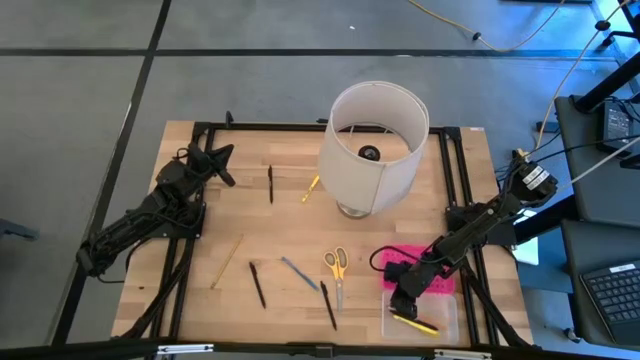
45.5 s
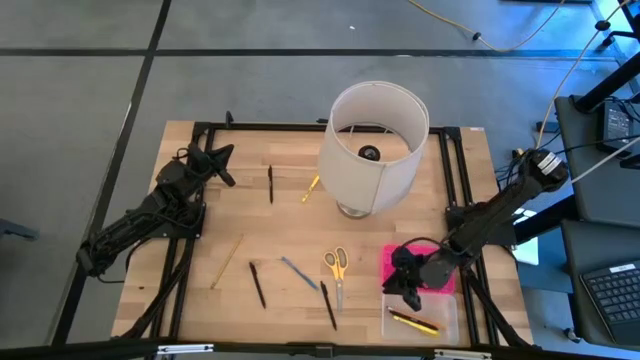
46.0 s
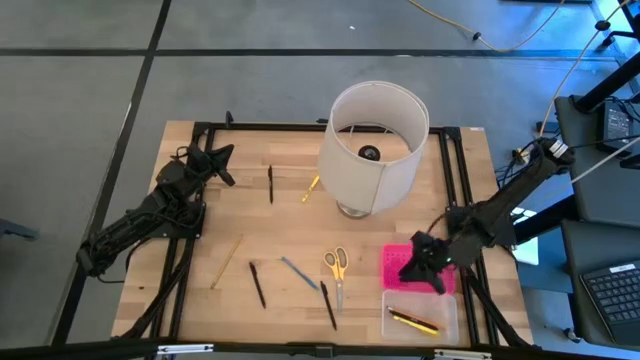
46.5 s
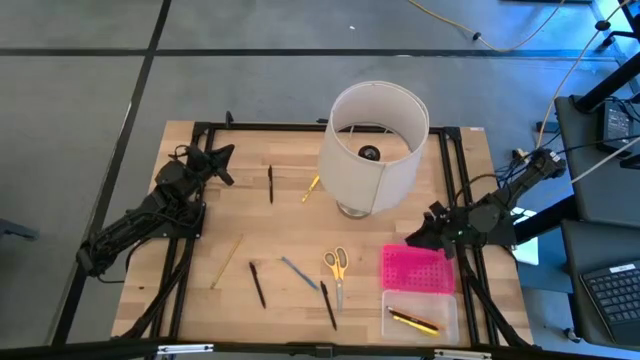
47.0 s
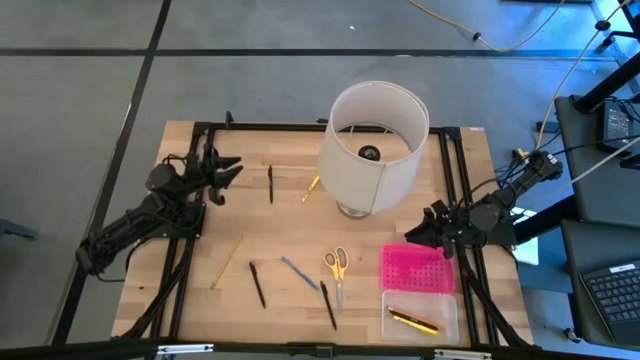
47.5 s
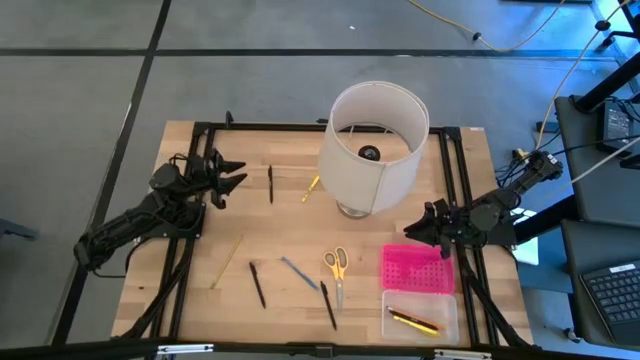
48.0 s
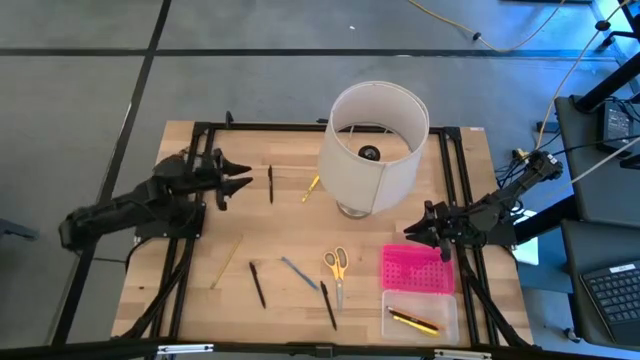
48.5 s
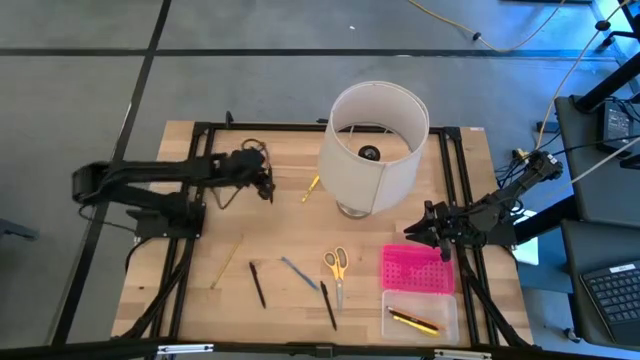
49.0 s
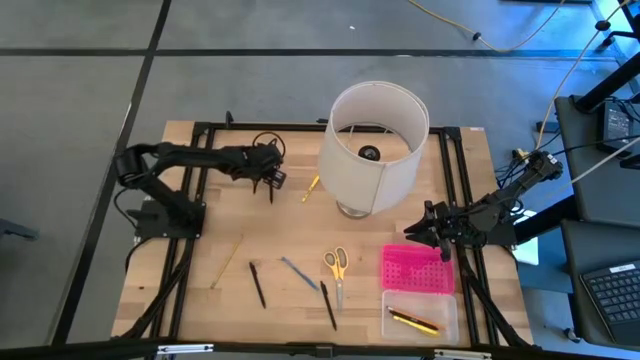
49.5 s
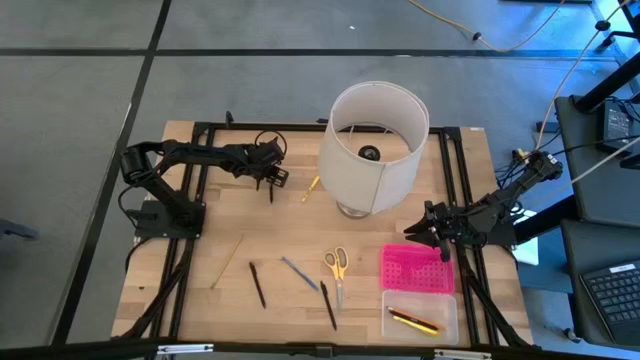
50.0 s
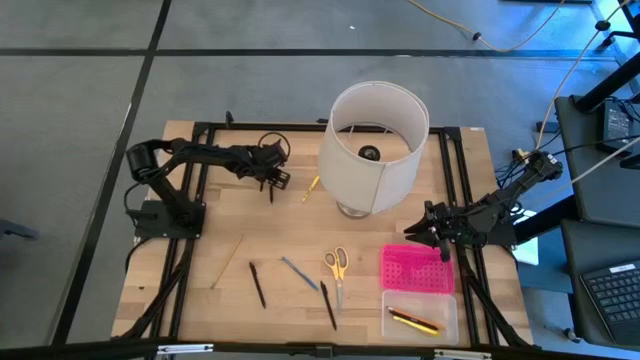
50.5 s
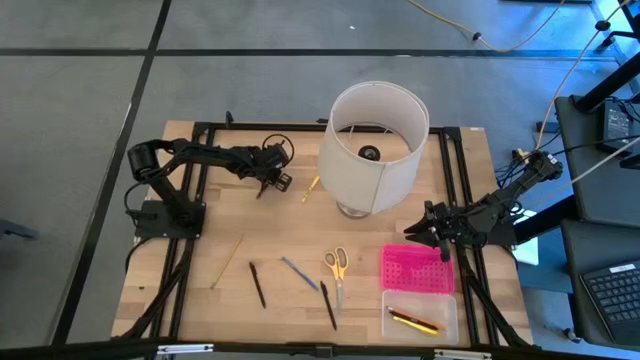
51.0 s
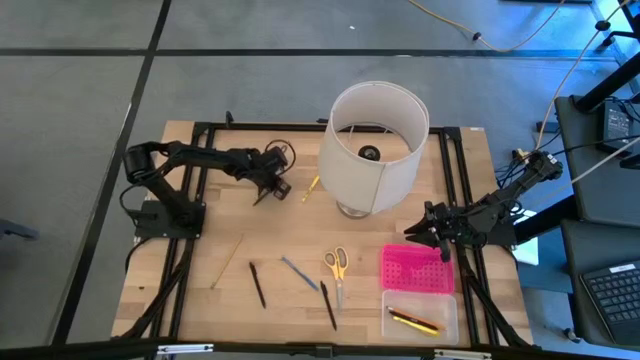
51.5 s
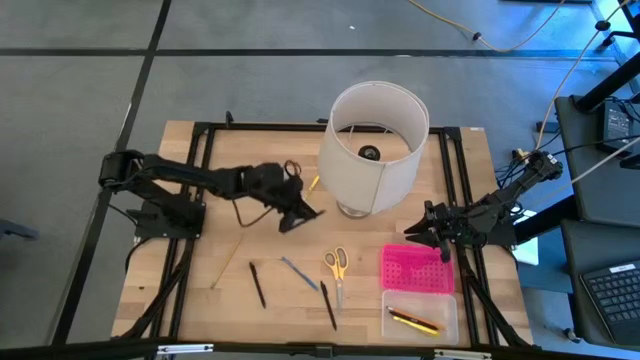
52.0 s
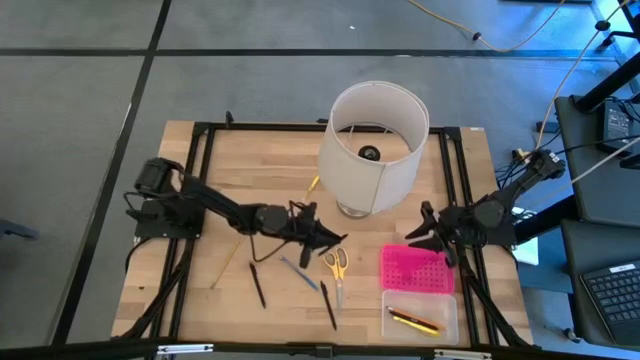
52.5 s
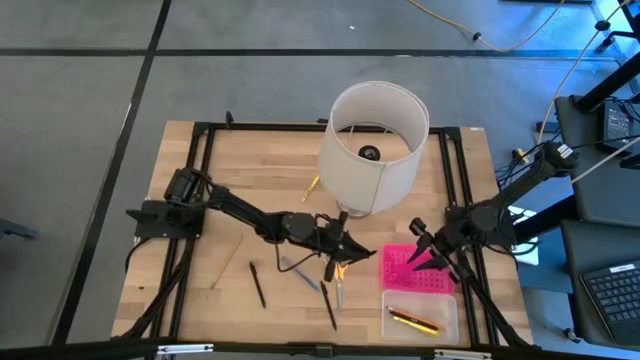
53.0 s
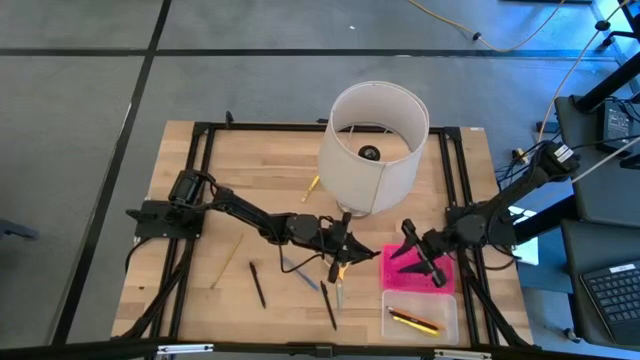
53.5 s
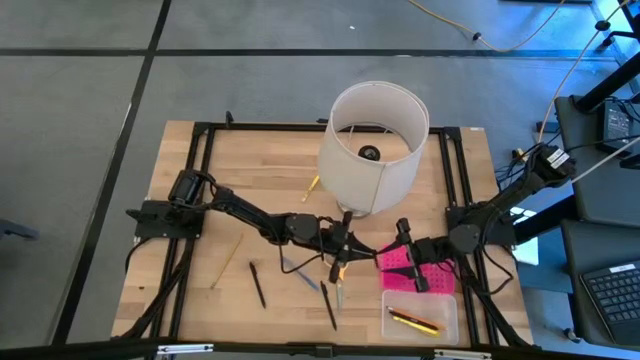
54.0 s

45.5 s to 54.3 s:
Task: Pick & place school supplies into a supply box
Put the black pen into the supply box

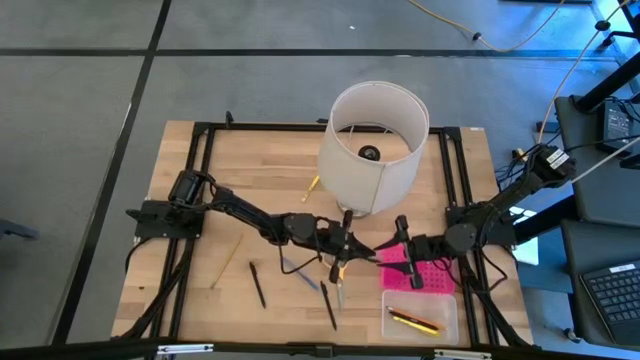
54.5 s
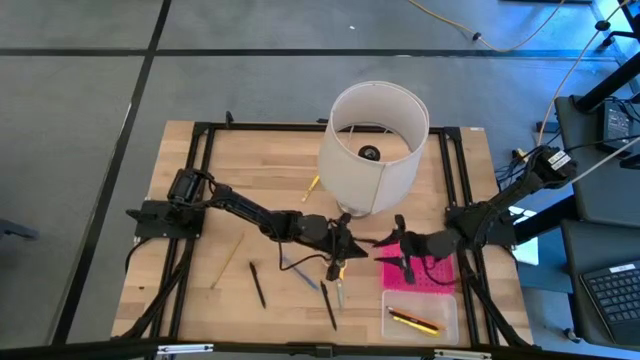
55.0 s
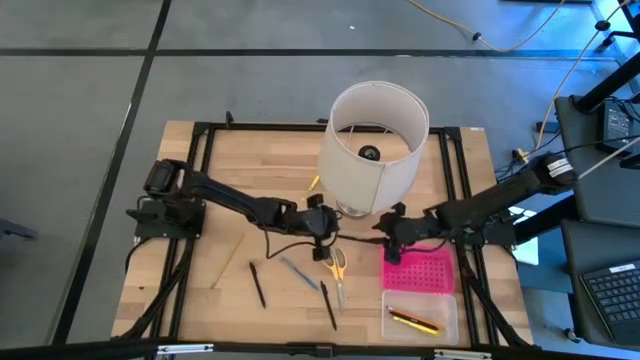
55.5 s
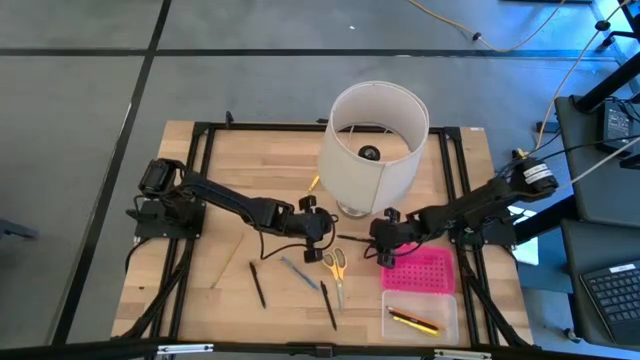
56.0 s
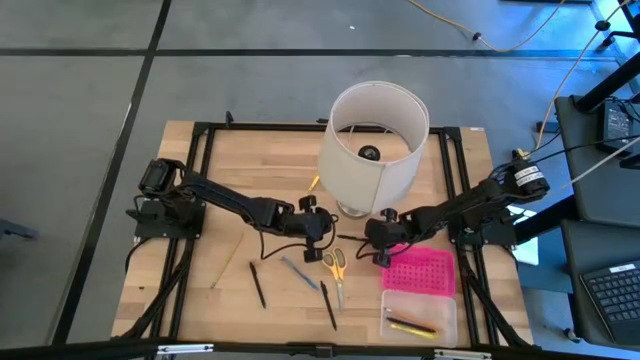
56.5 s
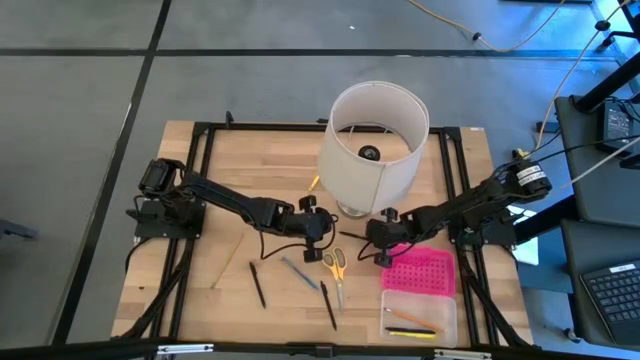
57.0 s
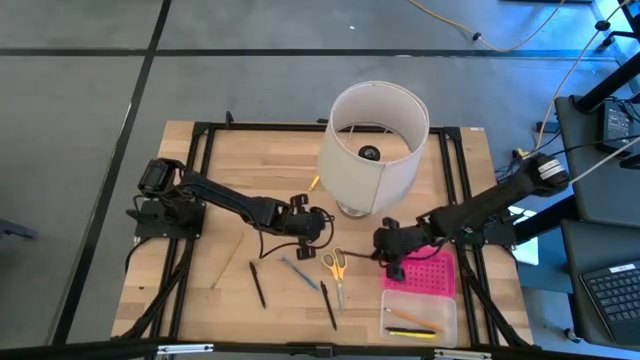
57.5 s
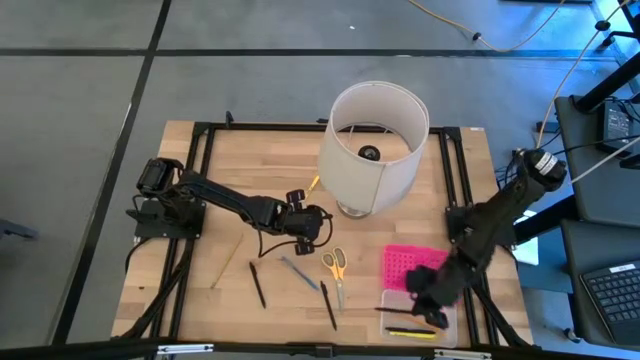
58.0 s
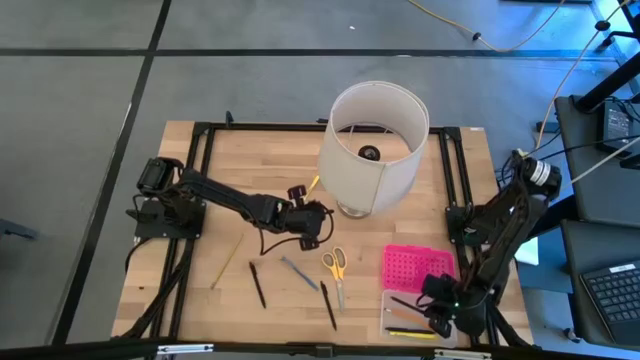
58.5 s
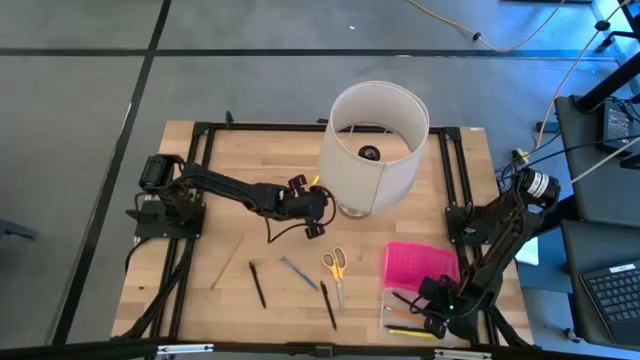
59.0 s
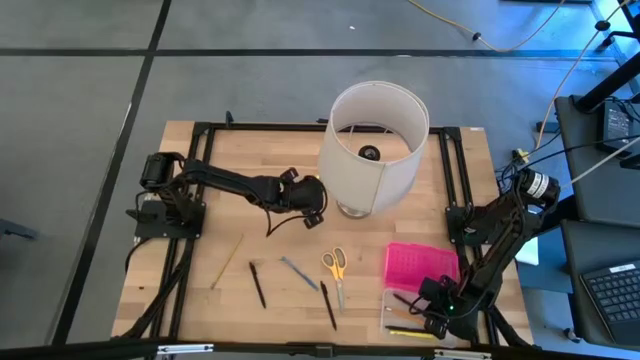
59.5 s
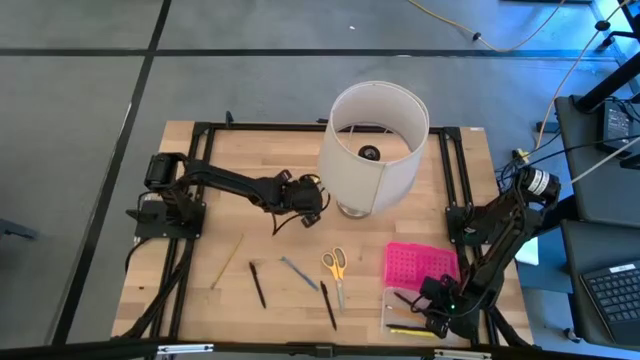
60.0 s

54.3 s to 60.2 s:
Put the black pen into the supply box

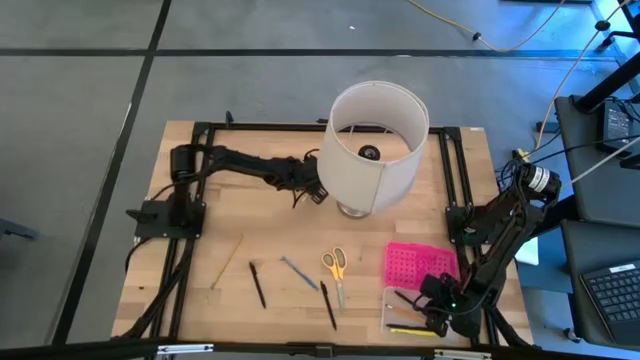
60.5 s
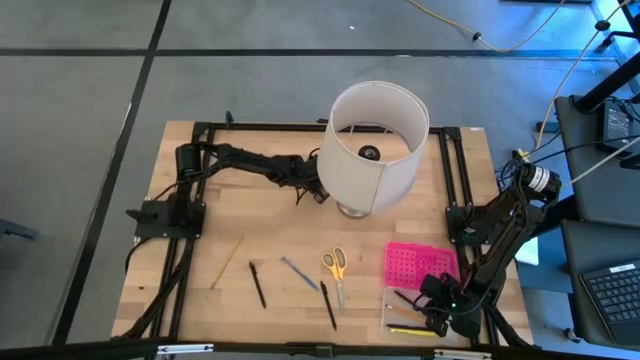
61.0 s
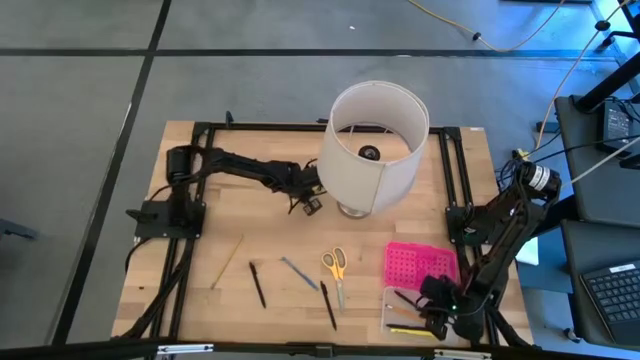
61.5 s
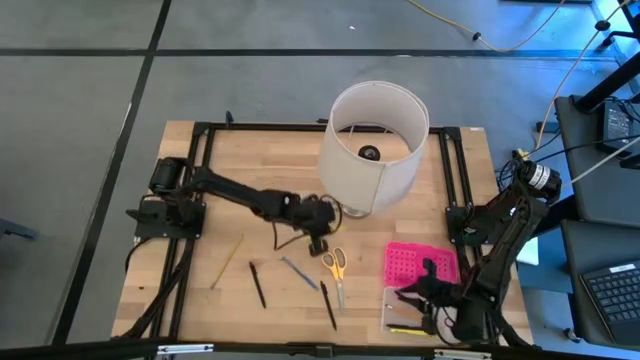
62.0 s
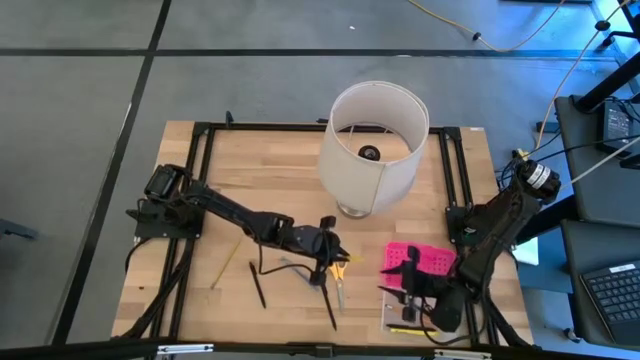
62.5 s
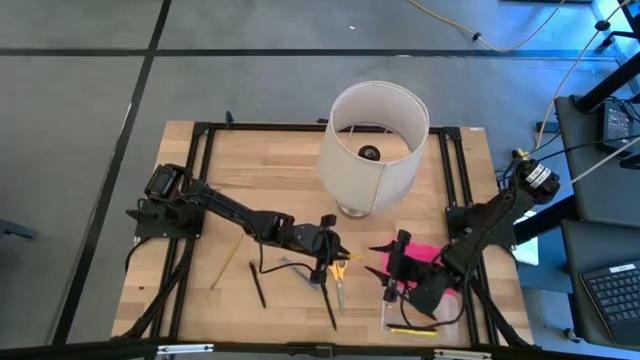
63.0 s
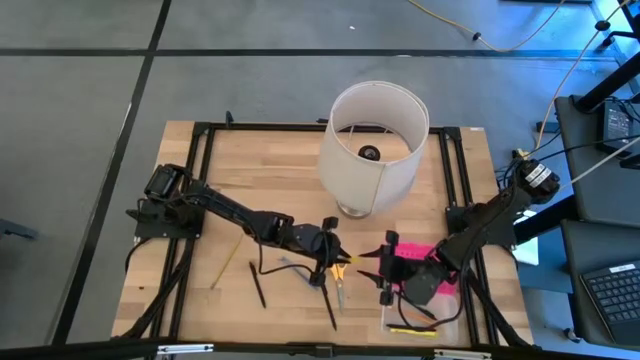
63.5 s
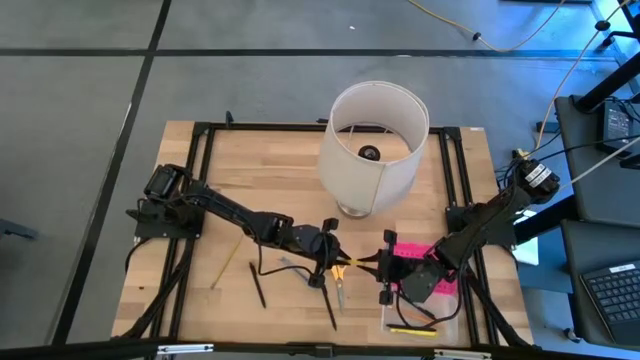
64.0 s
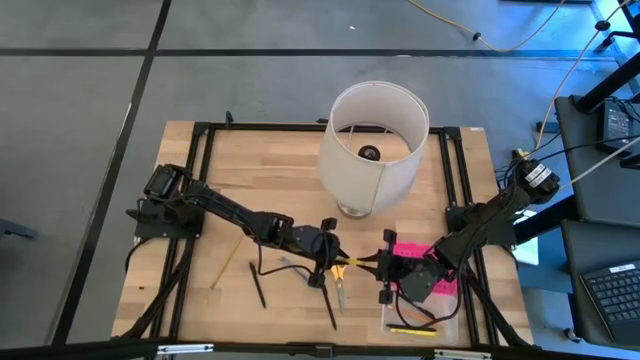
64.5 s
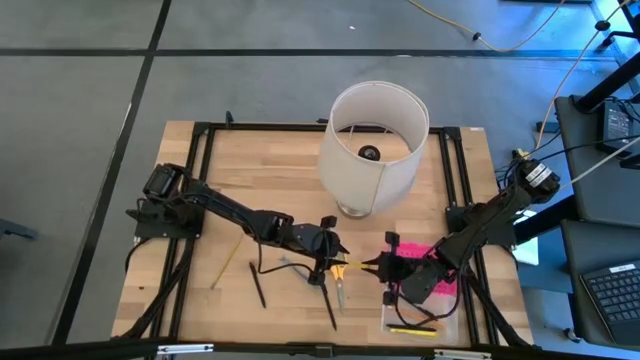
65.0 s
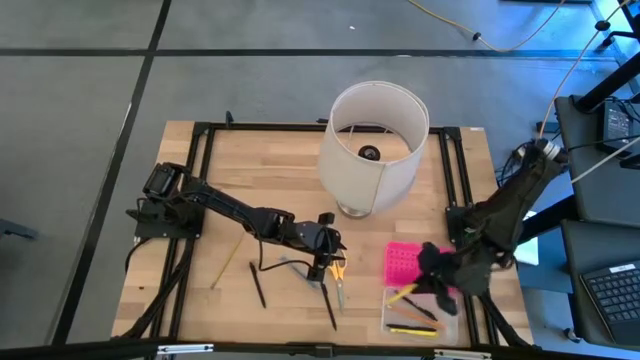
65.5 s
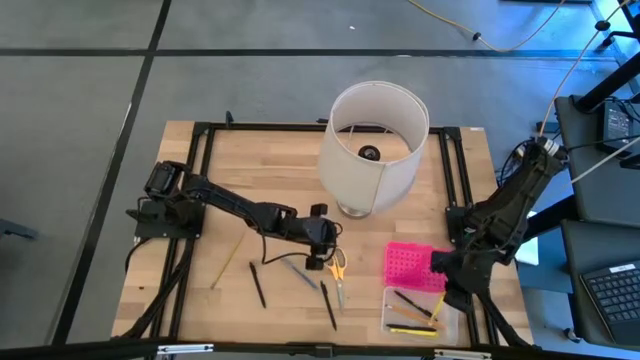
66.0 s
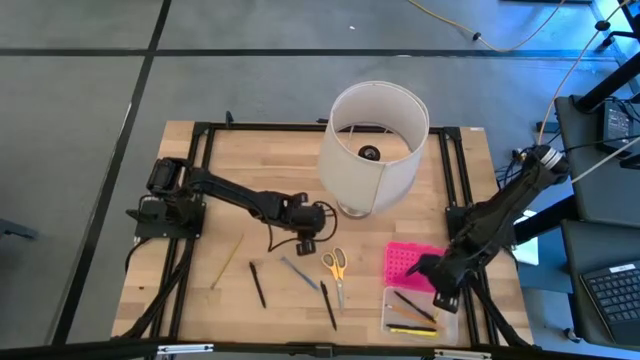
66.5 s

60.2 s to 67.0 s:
Put the yellow pen into the supply box
